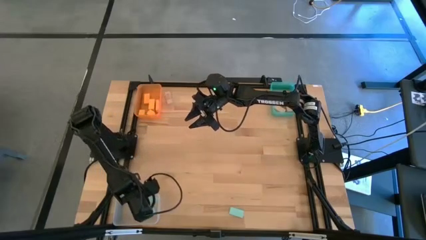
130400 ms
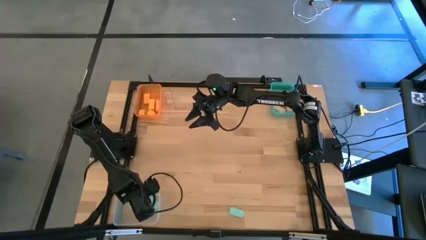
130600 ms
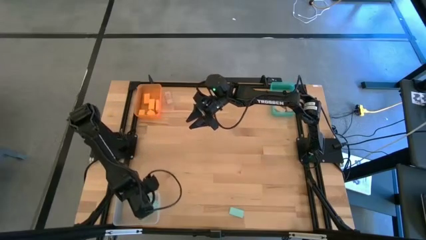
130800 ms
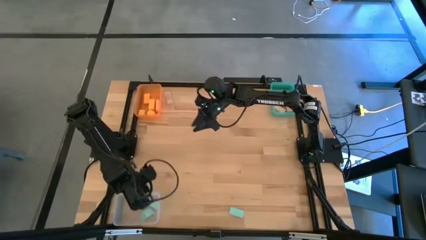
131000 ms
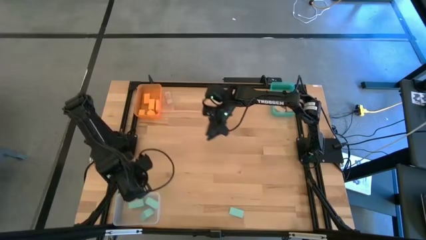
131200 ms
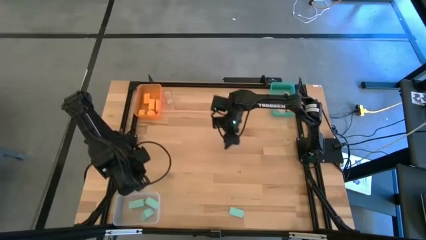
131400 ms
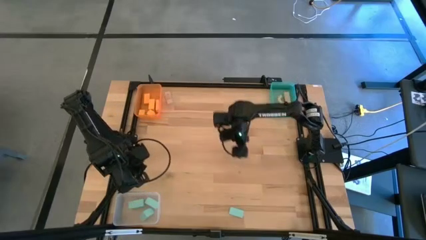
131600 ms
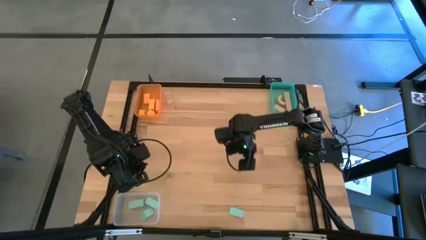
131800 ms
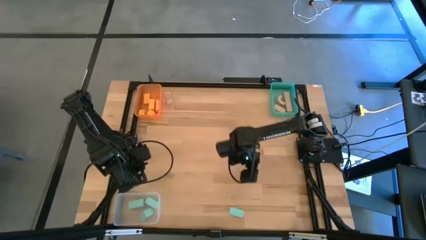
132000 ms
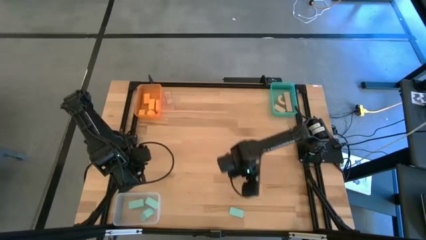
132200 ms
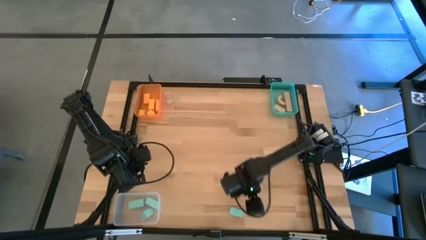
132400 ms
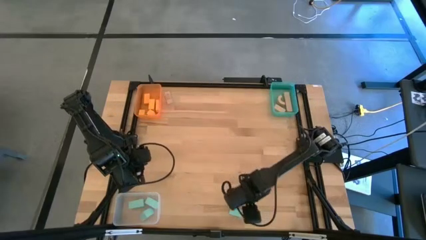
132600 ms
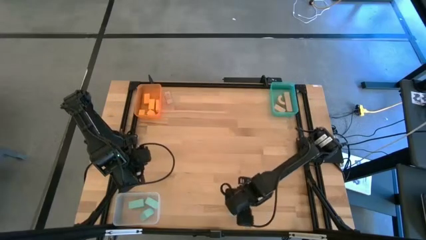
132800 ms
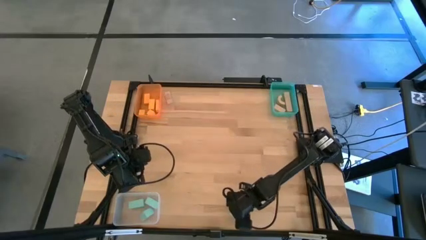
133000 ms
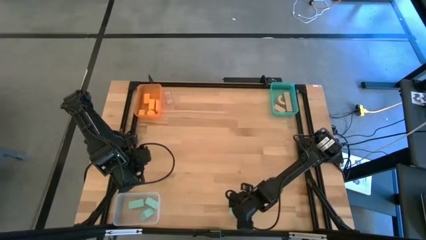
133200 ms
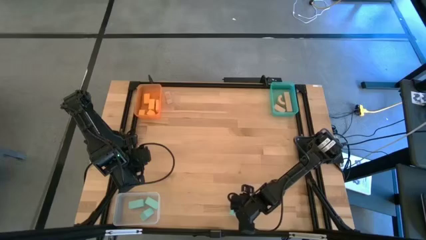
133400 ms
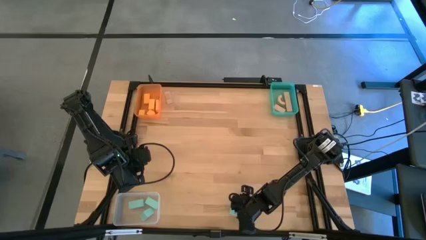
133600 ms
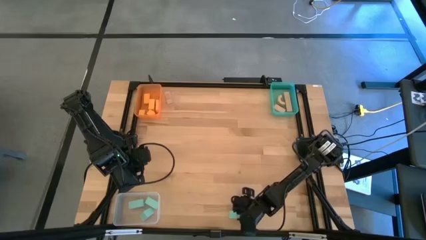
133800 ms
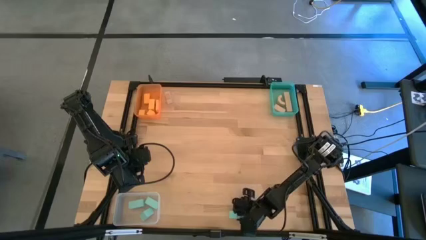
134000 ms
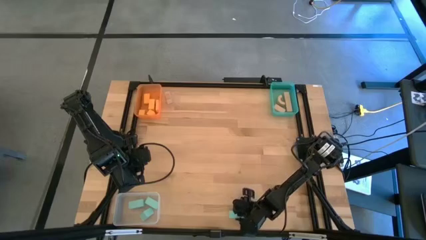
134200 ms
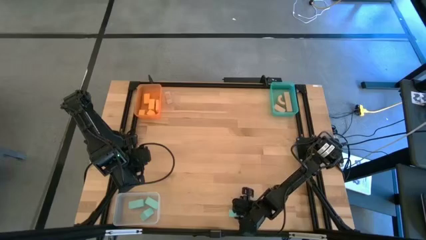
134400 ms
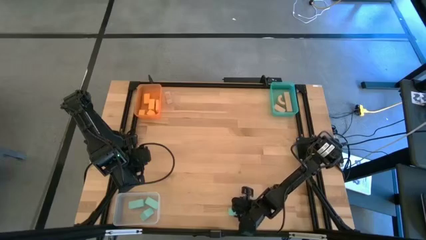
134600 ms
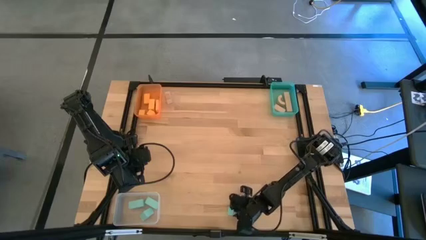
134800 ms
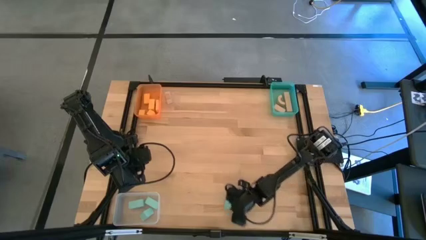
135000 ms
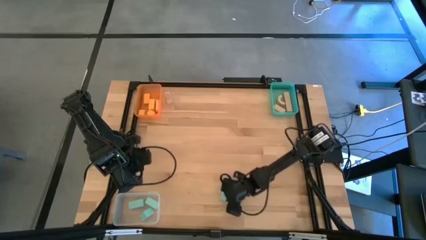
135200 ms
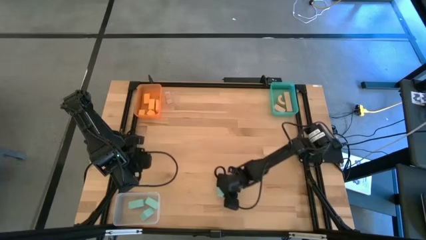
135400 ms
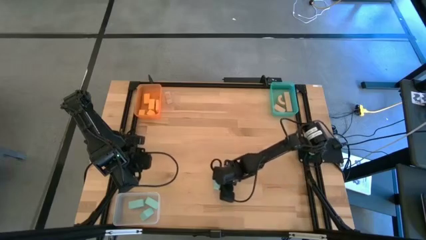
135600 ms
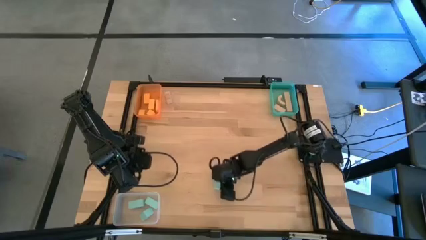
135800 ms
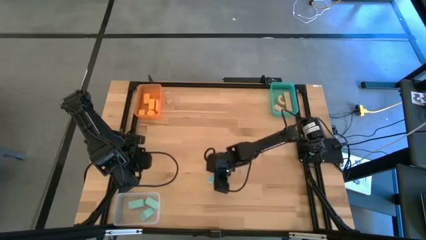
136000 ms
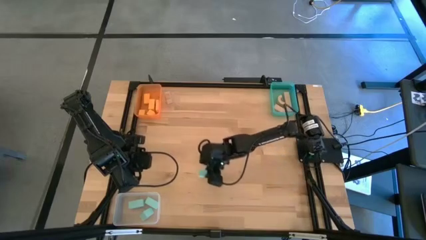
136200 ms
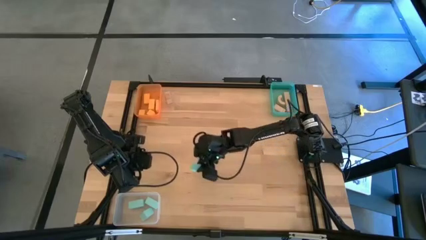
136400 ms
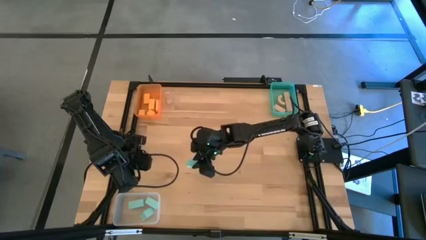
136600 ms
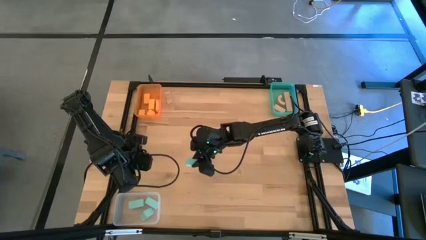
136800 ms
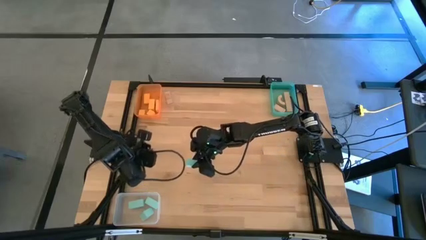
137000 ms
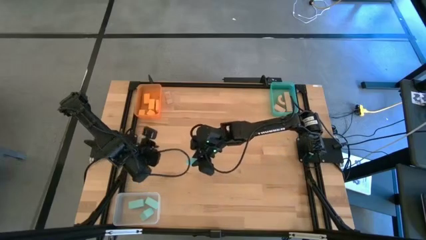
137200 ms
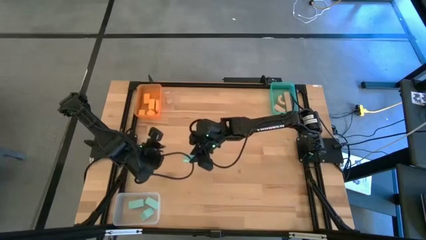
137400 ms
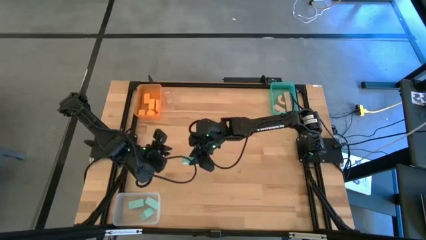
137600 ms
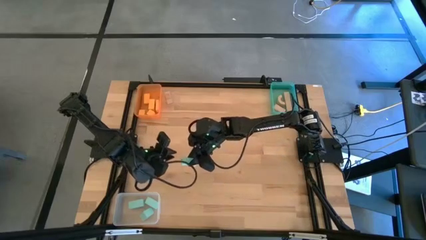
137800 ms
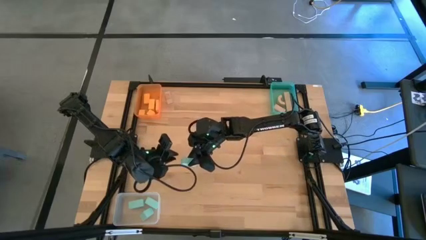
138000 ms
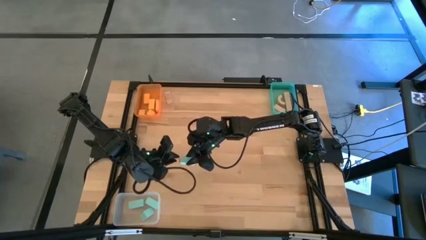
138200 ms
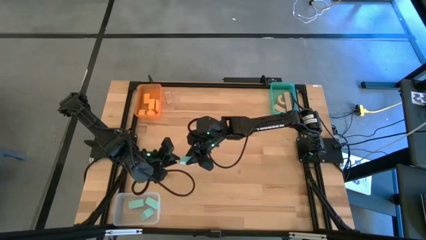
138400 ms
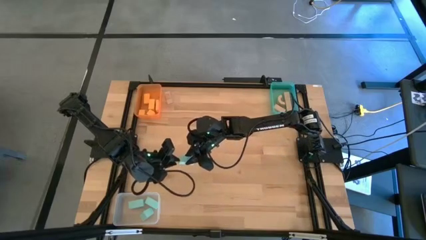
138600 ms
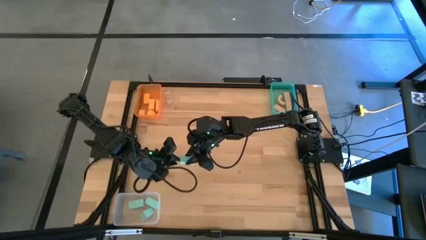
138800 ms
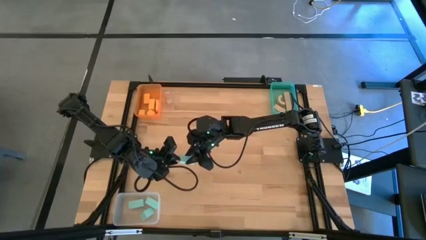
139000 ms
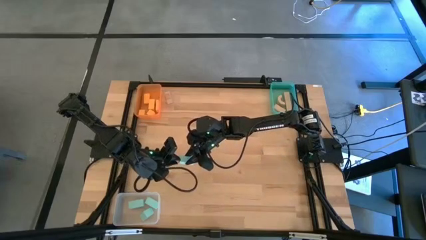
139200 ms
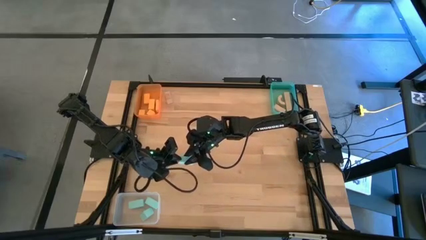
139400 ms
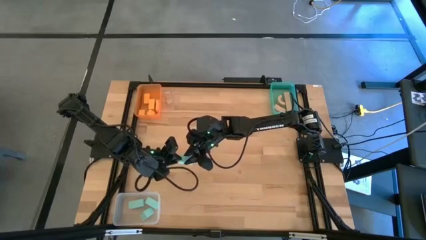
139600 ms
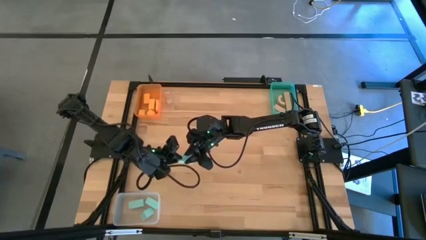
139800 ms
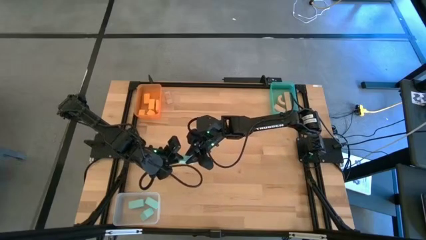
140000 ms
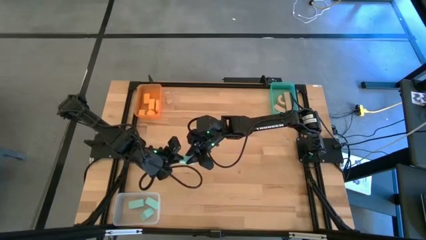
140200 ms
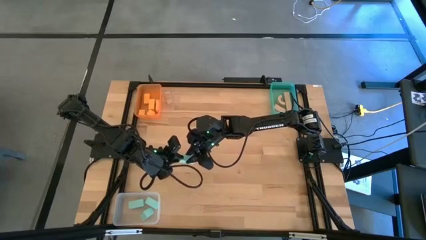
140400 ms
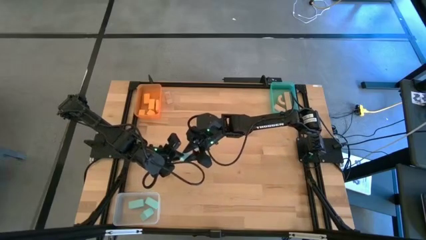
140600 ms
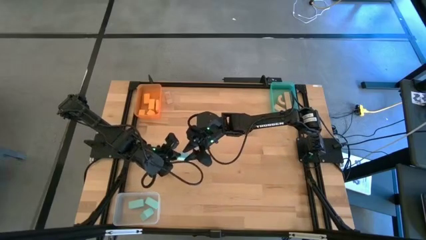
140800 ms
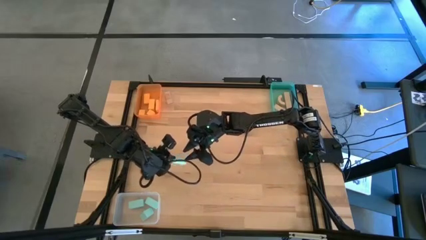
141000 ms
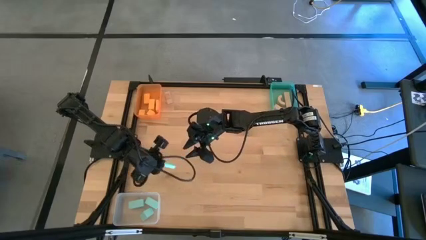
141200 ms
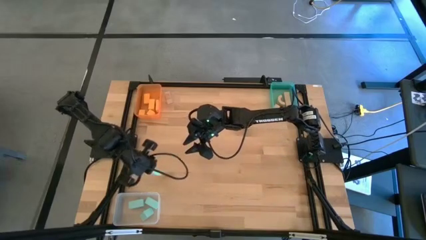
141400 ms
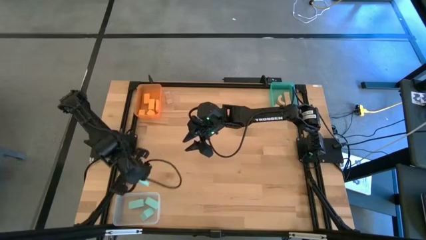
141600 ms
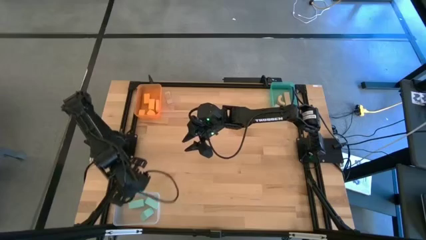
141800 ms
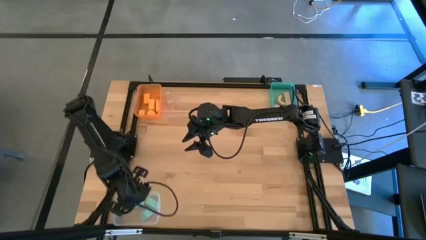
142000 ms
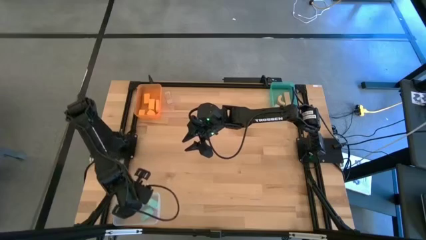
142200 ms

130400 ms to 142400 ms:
Task: Sort & place blocks by color
Put the blue block into the transparent bin

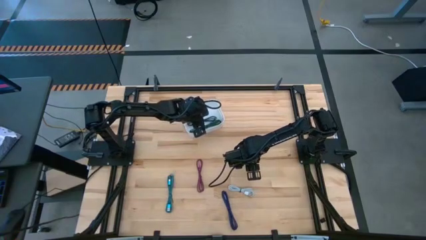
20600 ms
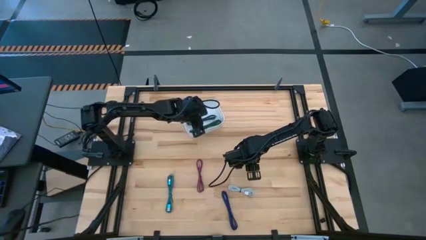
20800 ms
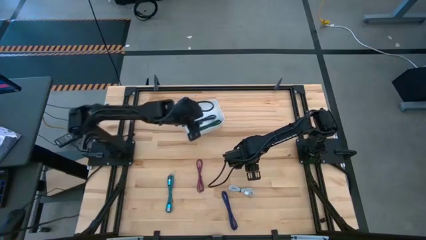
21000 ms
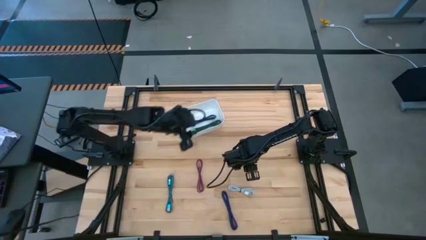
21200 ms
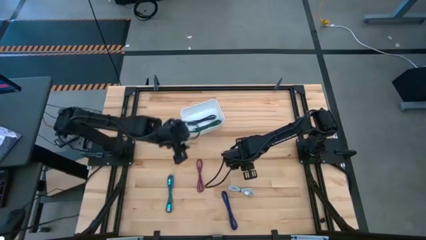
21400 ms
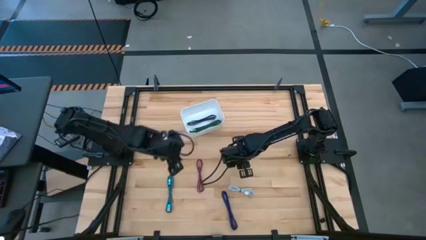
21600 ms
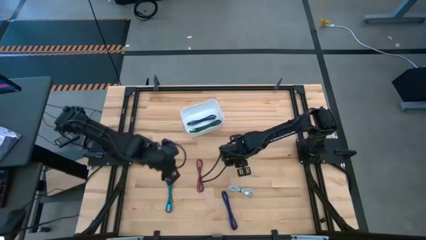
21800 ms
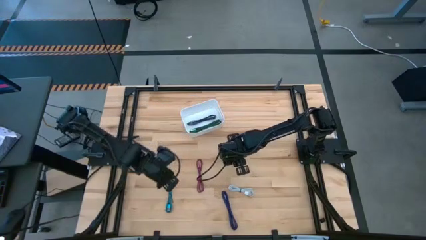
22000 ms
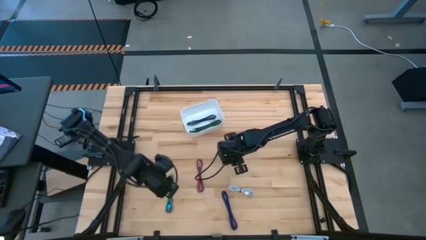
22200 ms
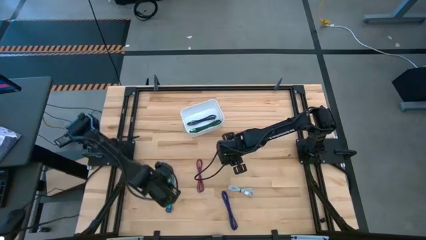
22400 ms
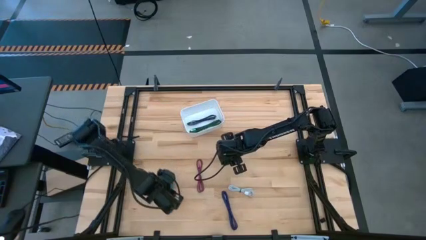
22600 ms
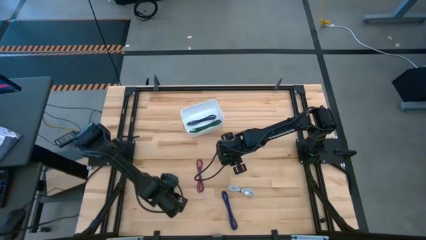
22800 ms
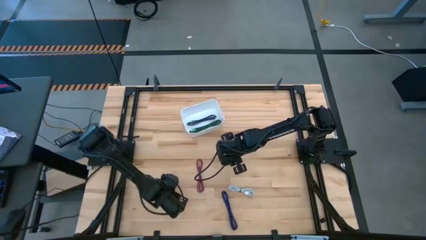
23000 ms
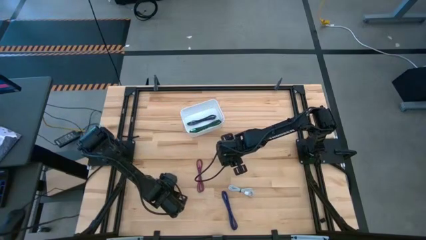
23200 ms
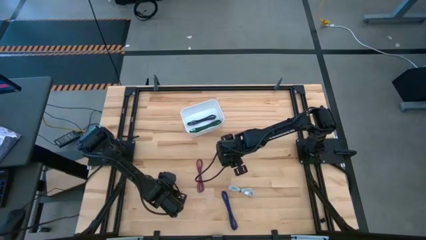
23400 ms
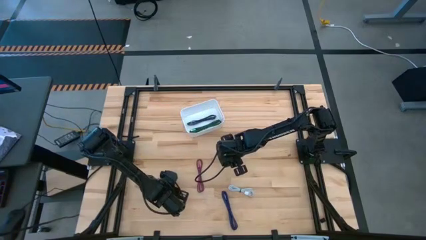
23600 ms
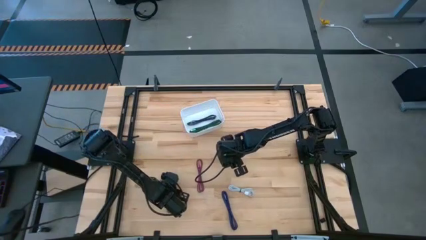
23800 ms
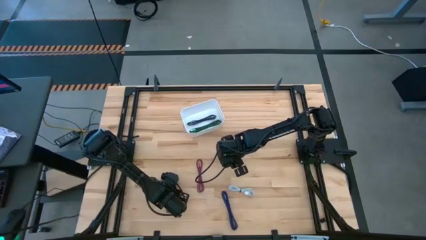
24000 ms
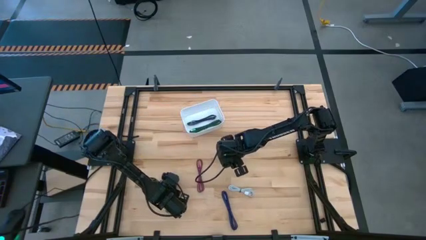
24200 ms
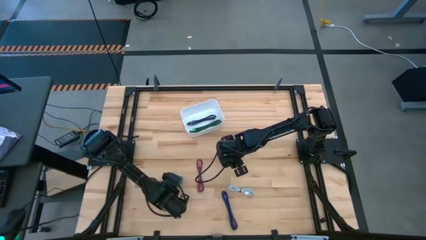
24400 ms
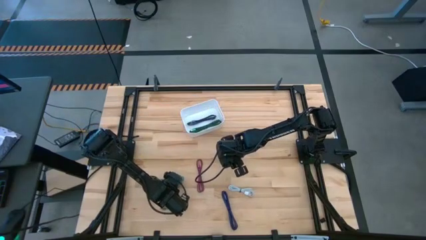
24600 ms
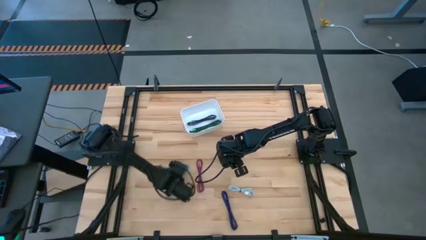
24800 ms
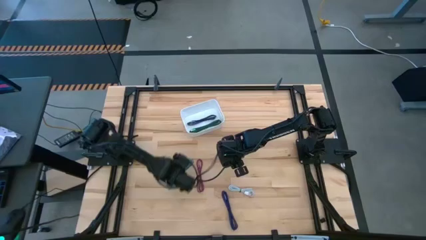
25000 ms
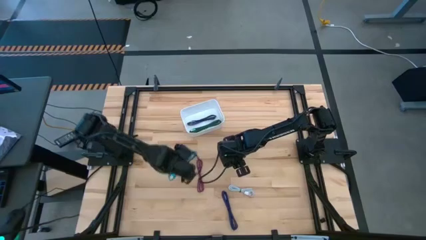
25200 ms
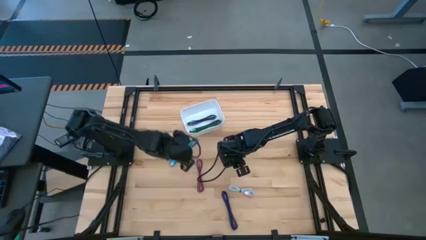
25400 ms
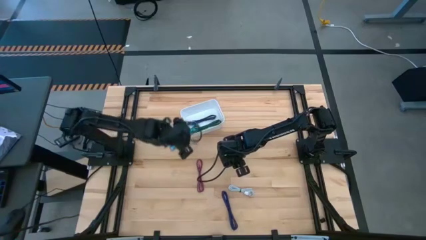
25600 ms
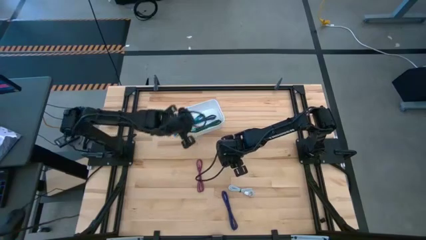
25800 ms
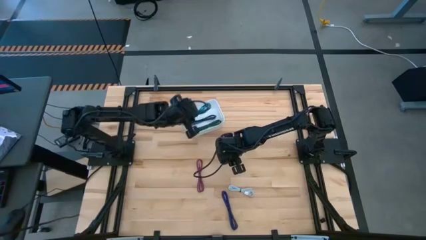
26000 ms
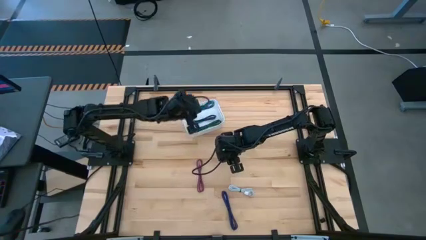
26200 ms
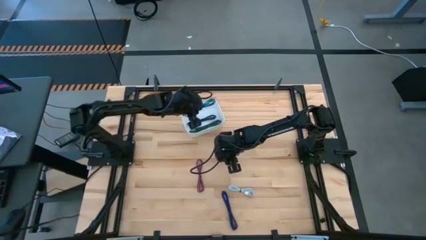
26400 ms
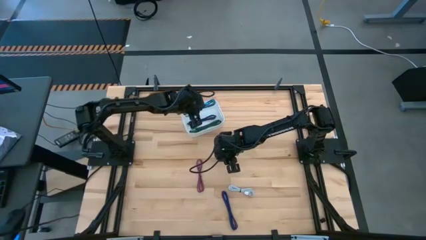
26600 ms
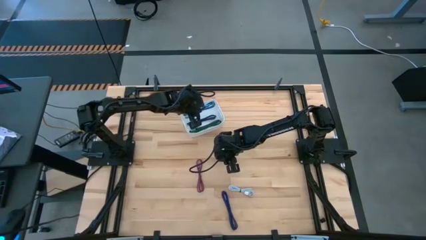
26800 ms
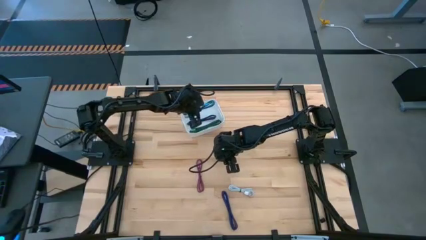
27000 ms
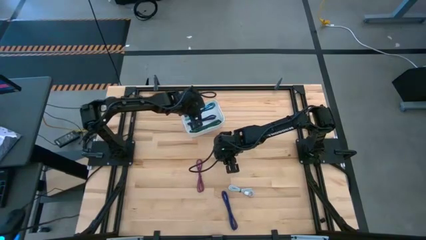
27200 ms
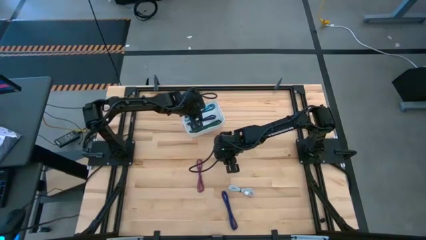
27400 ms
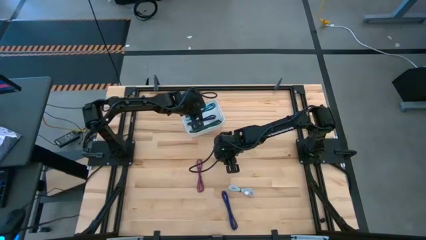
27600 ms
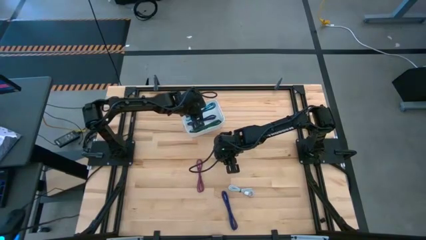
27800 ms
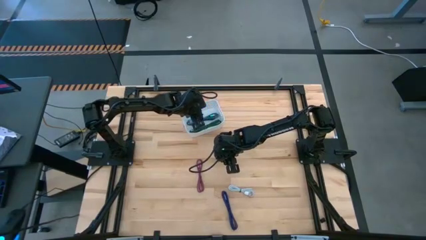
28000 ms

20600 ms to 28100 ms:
Task: Pick and place USB-C Cables
Put the blue charger cable into the white bin
